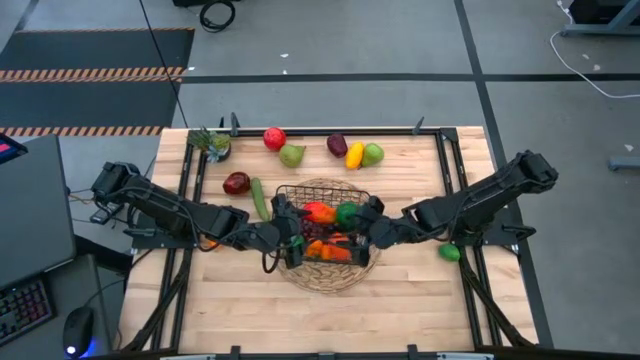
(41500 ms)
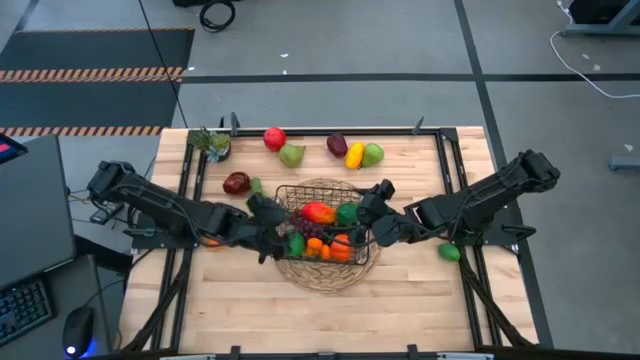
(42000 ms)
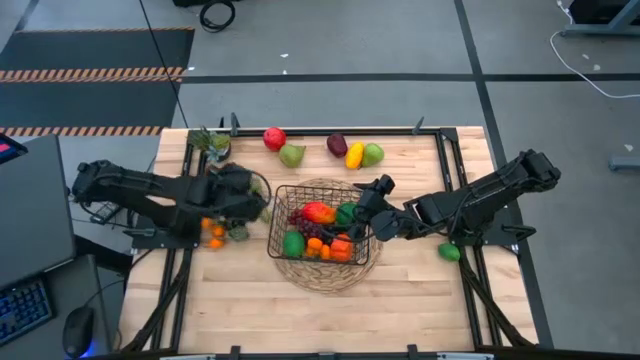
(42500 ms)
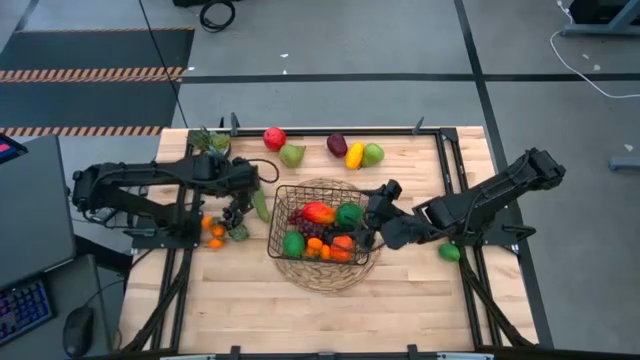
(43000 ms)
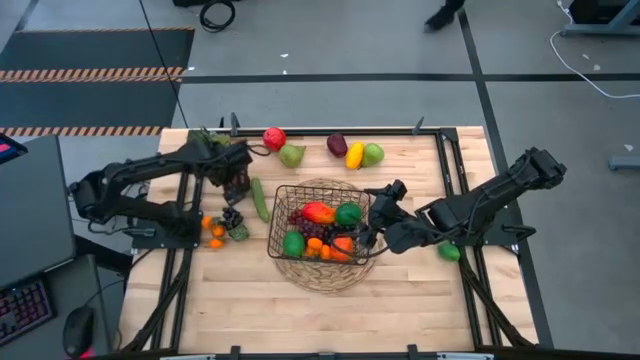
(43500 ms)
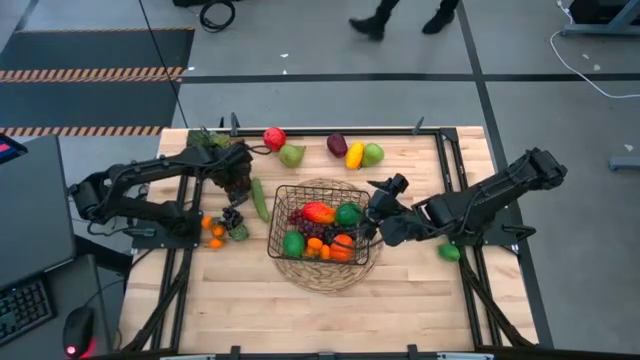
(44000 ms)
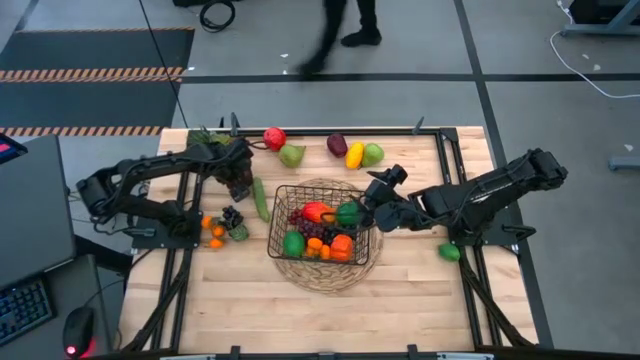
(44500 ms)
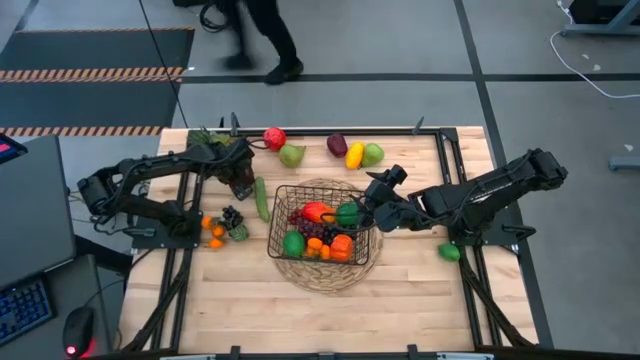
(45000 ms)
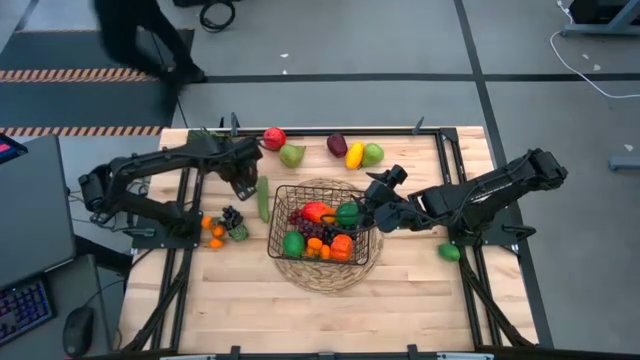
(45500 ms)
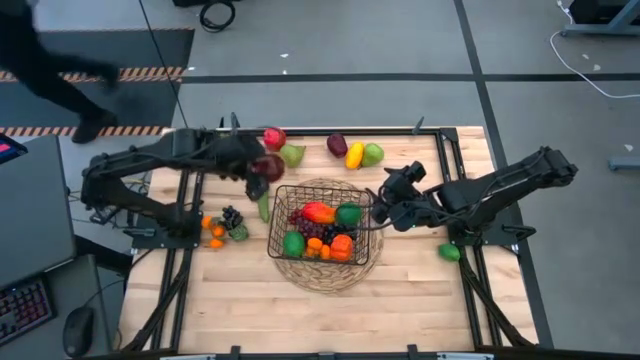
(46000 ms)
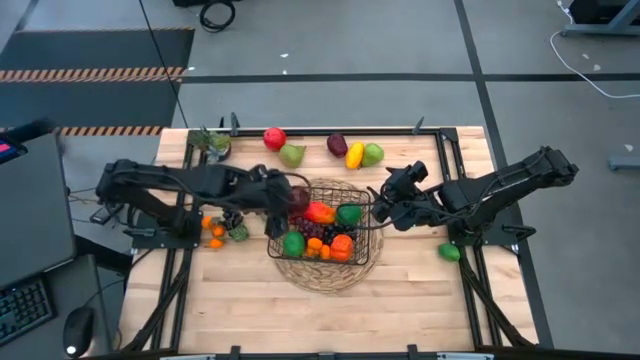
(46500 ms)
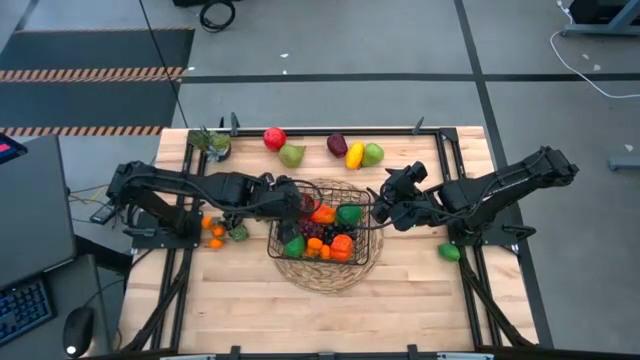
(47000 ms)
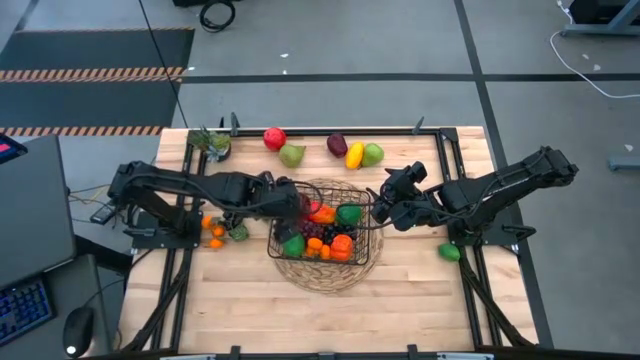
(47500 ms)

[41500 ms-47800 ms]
Task: Build produce basket
Put the bottom dark red apple into the black wire basket

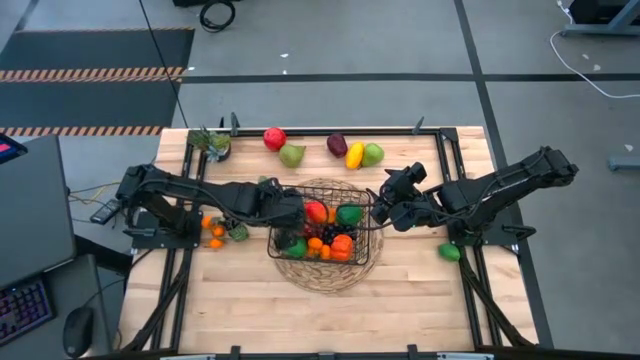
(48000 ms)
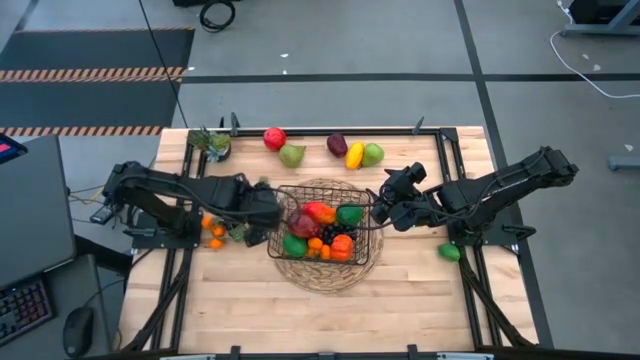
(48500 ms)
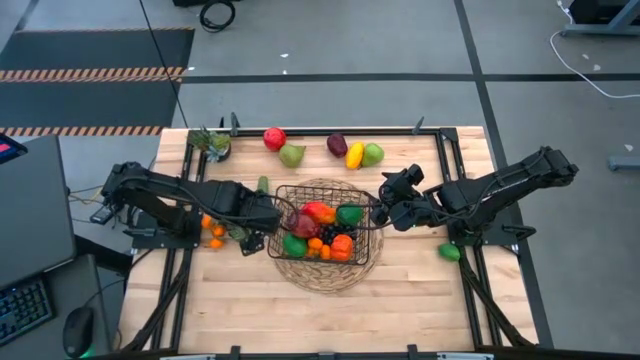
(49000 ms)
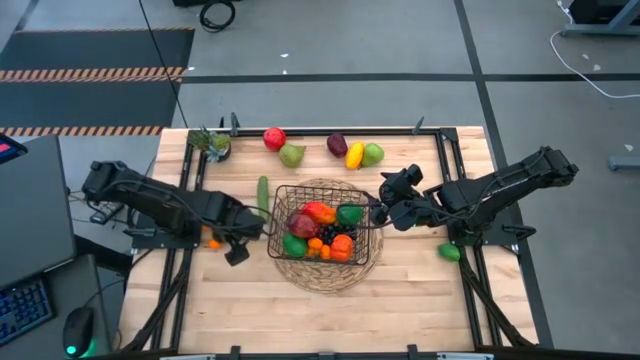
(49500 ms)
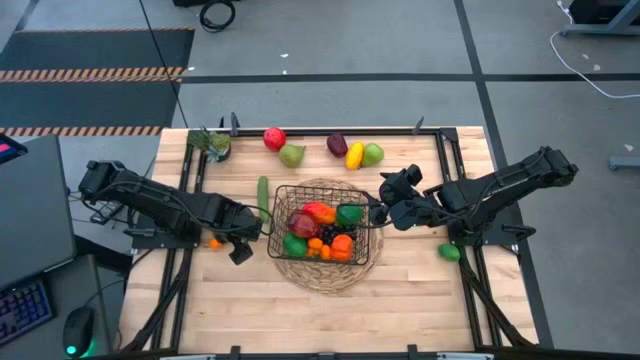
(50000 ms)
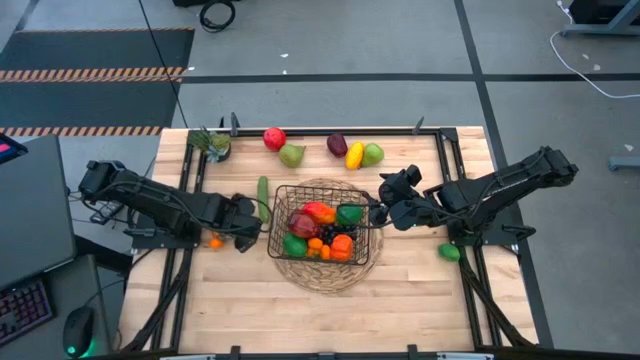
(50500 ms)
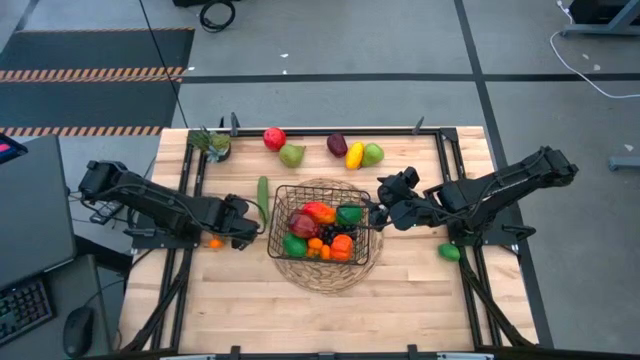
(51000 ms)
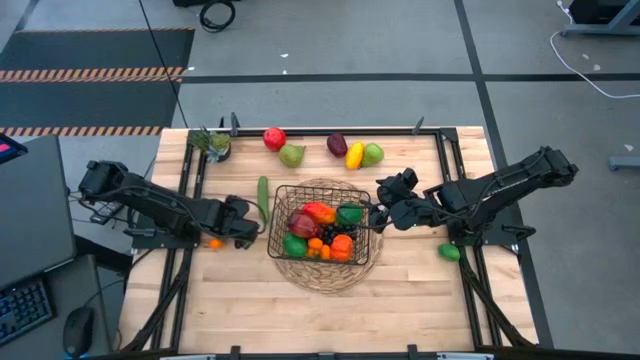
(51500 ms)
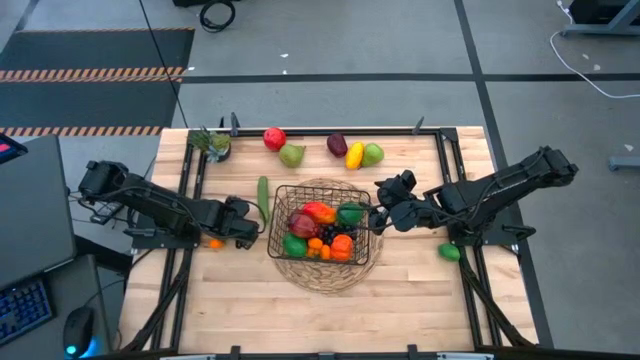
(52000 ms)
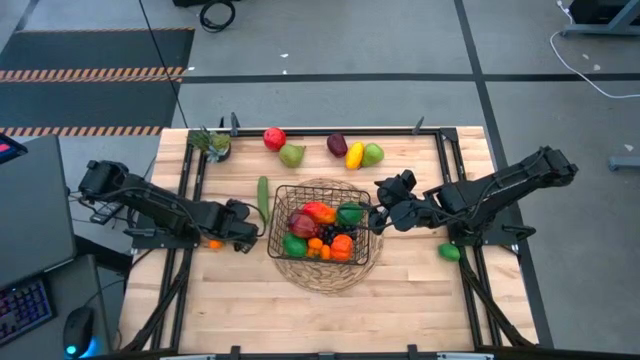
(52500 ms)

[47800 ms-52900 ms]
Put the black grapes into the black wire basket

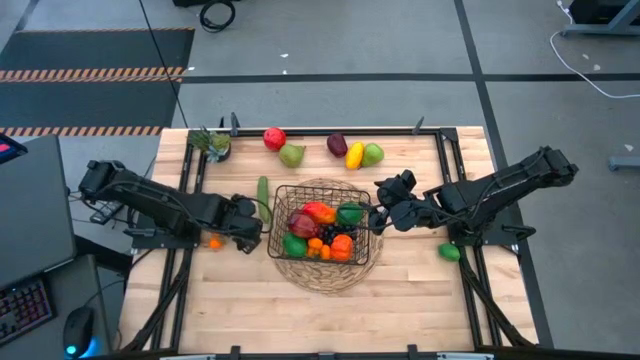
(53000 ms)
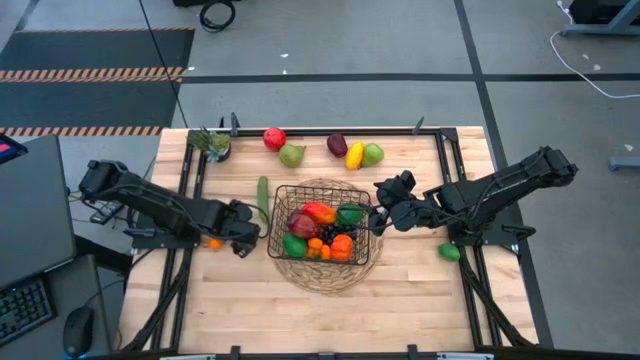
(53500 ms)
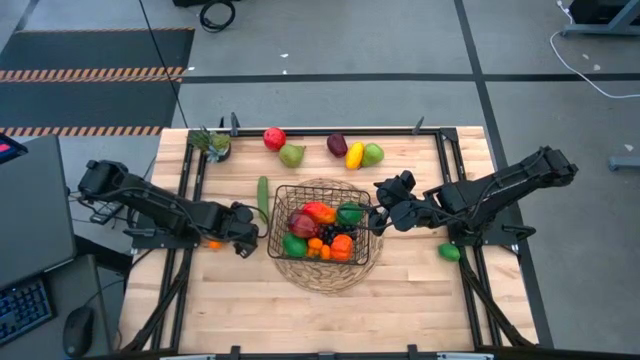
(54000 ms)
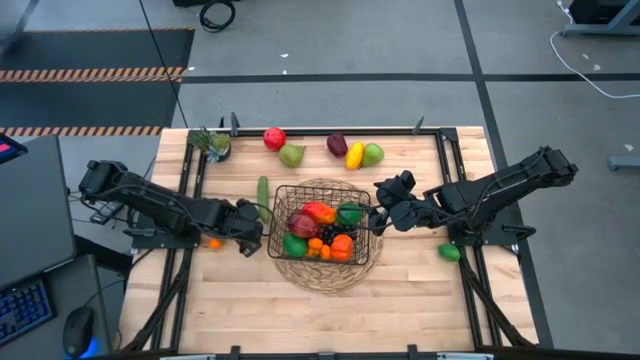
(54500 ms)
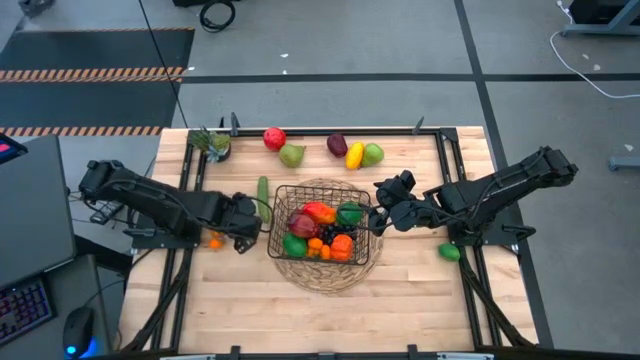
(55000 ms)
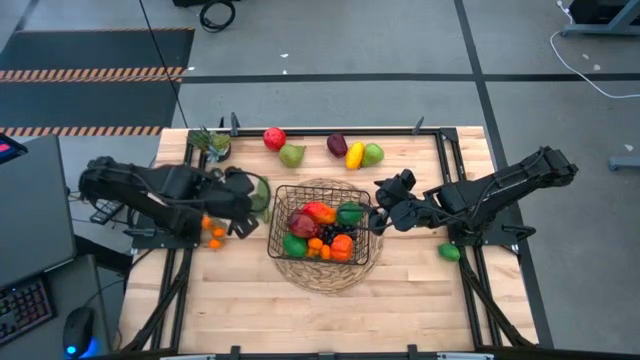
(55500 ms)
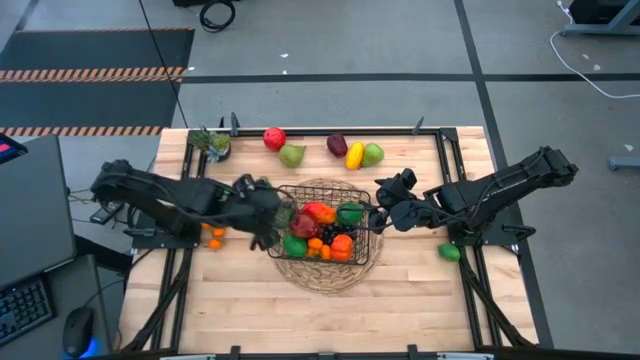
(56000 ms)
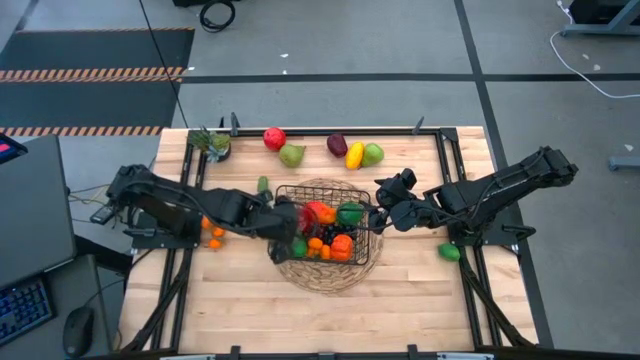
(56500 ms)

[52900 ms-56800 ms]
Put the black grapes into the black wire basket

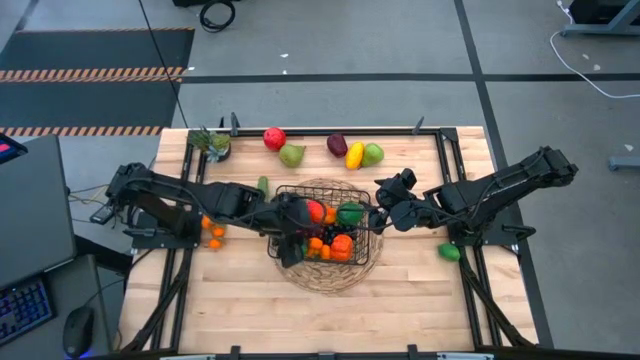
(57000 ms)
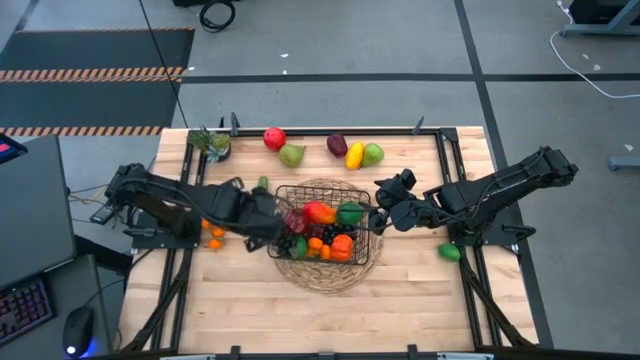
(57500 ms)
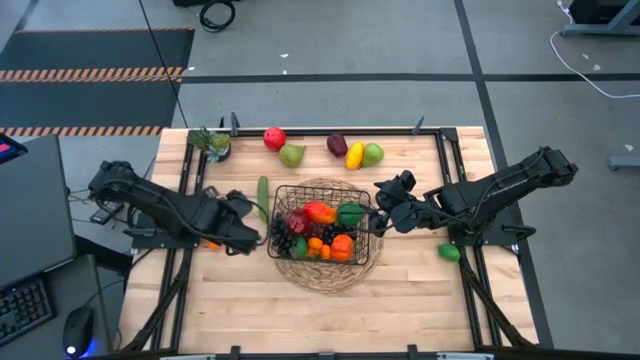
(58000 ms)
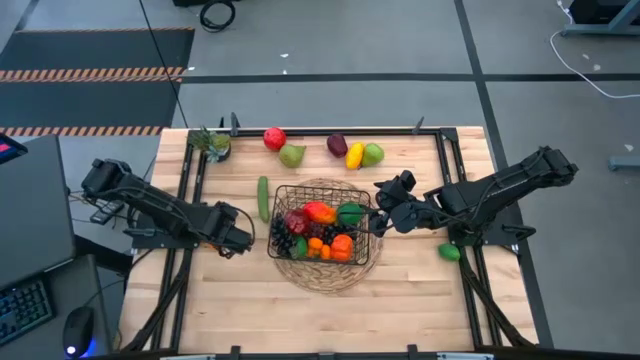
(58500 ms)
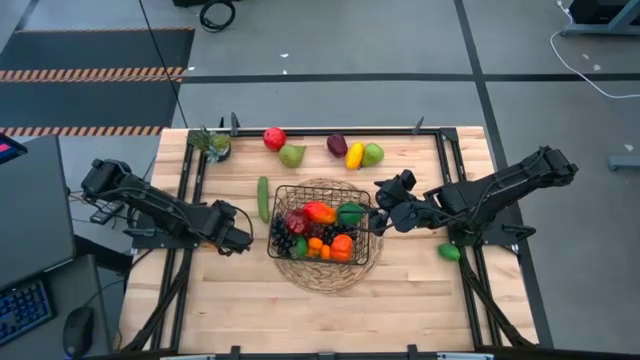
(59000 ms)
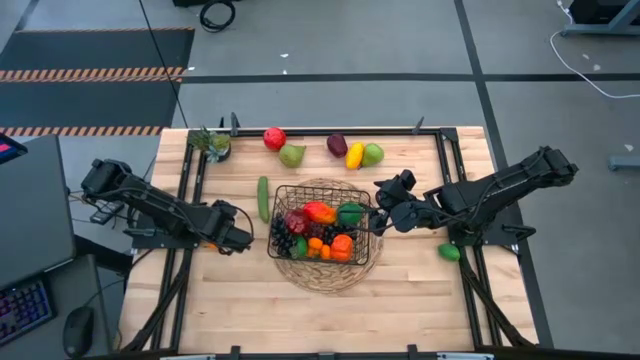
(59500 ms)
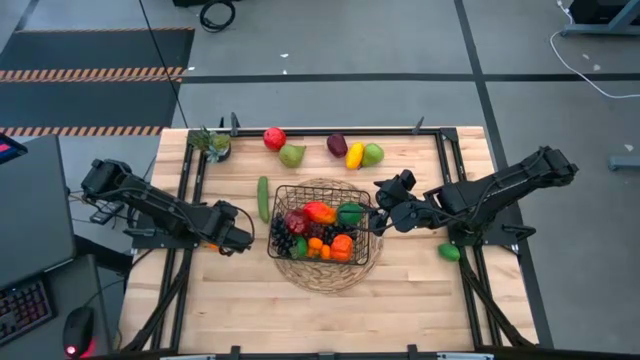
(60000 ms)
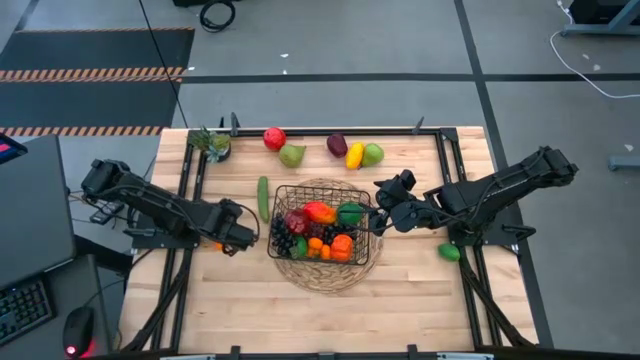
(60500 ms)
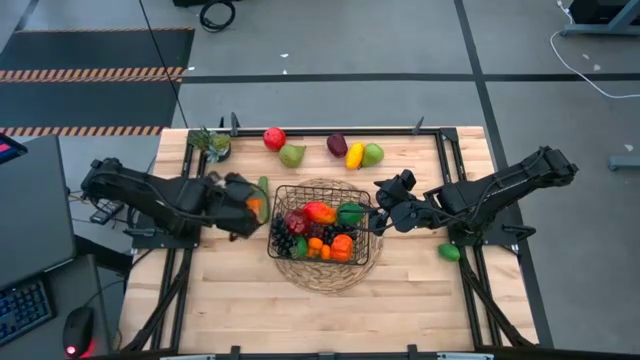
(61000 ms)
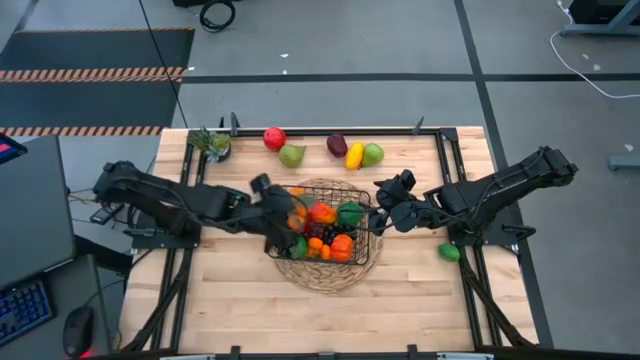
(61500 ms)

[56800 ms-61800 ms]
Put the tangerines into the black wire basket
